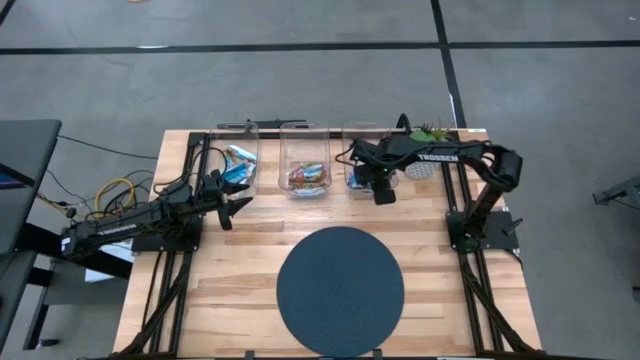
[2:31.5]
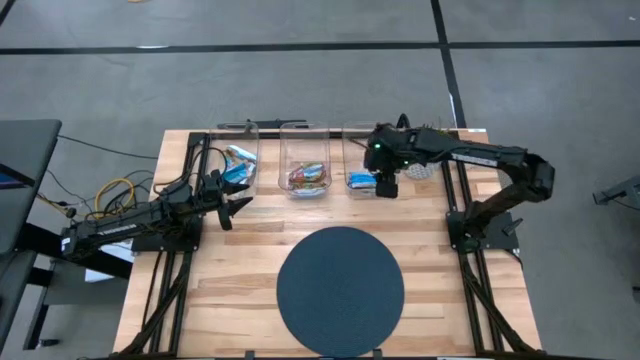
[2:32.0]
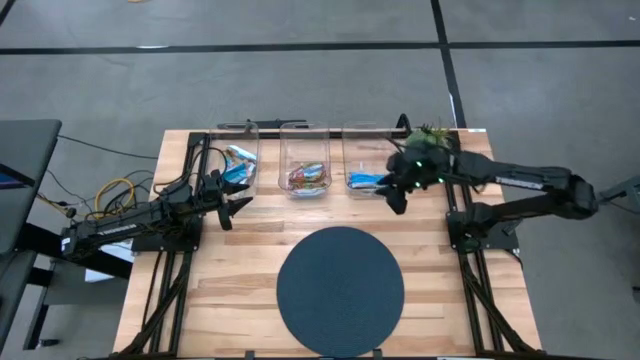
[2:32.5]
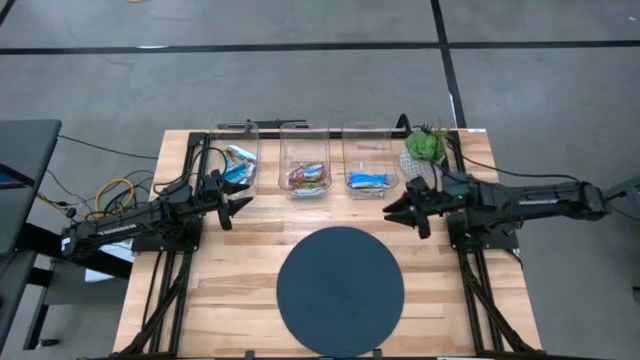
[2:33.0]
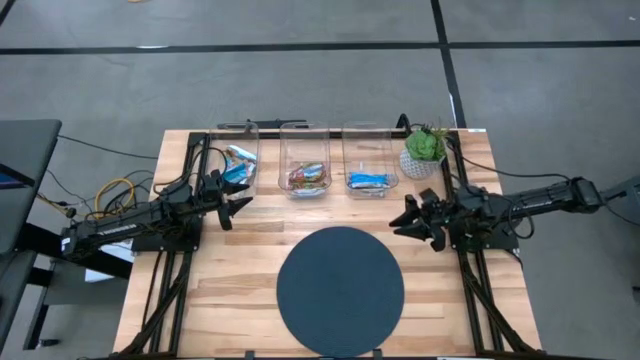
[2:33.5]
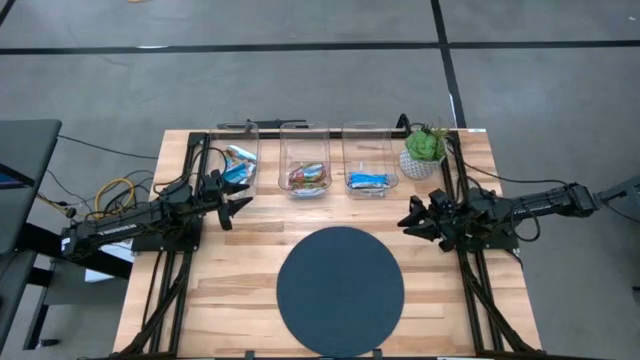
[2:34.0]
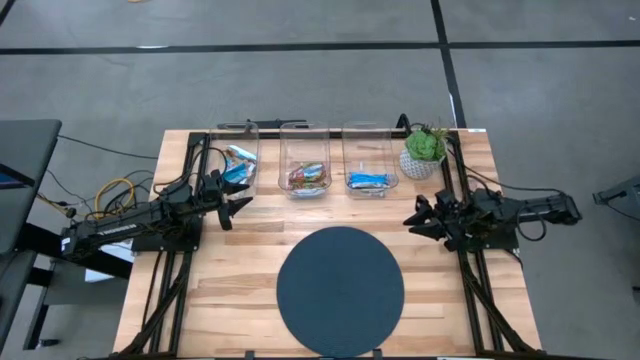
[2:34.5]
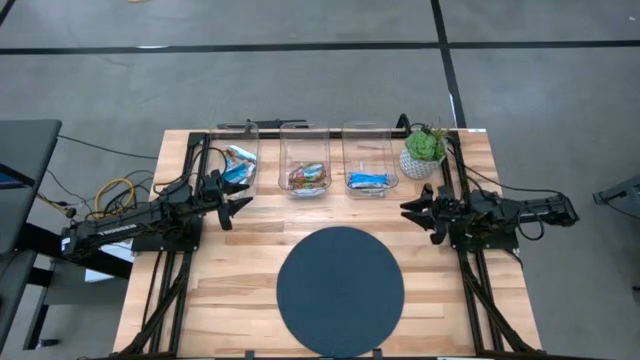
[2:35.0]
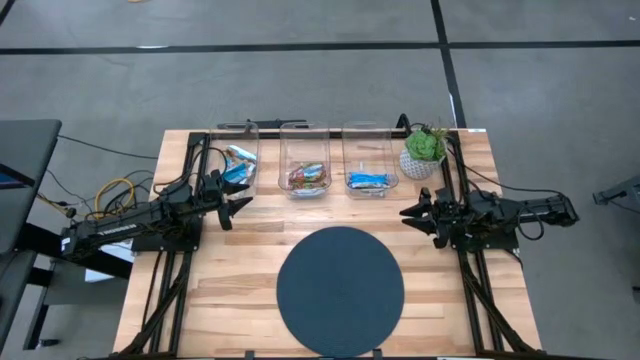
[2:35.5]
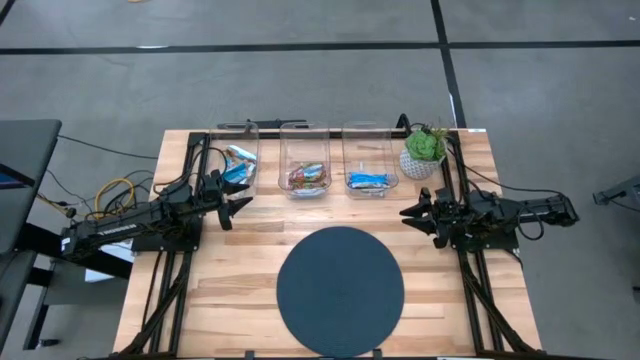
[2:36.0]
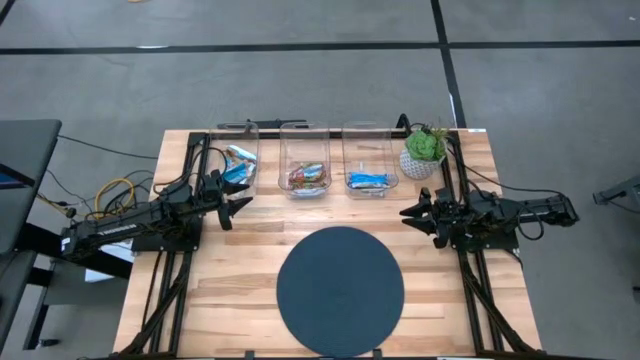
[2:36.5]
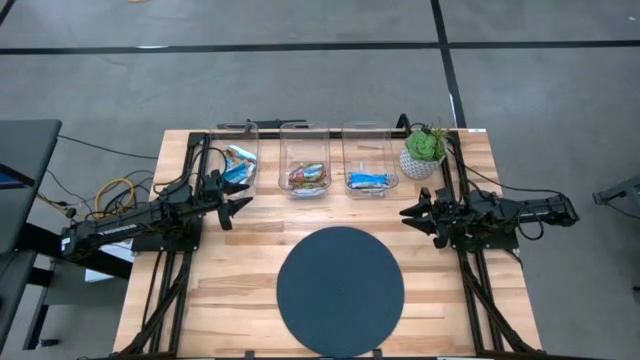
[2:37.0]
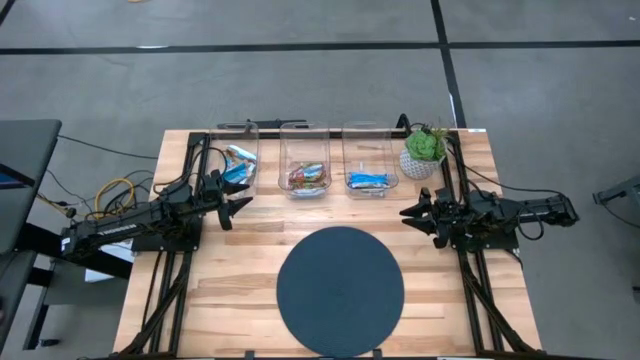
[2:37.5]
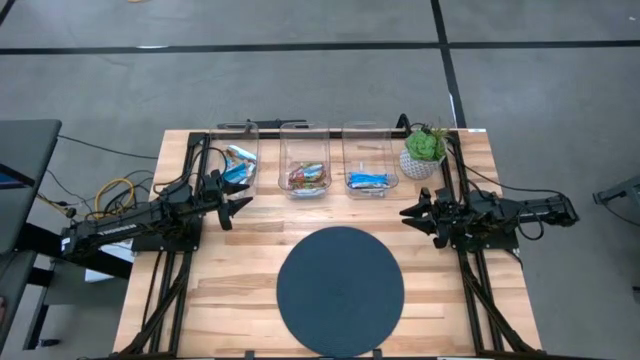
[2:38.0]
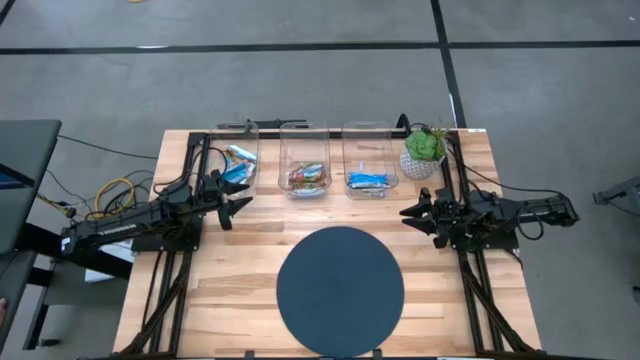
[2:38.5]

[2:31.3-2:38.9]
Task: Pick and place Granola Bars by type
Return to Home Position
